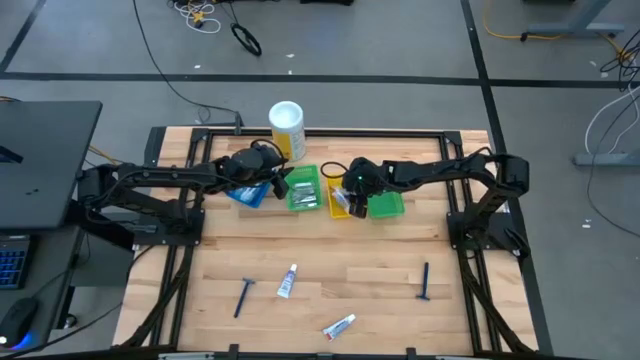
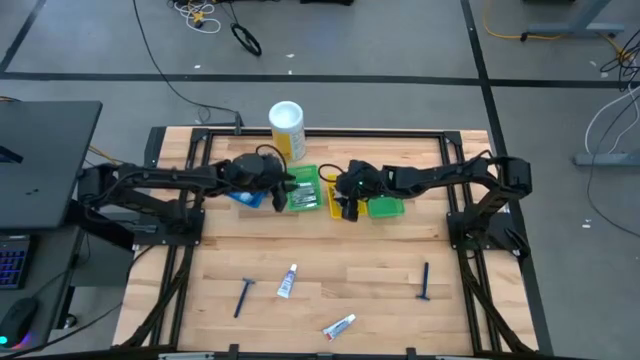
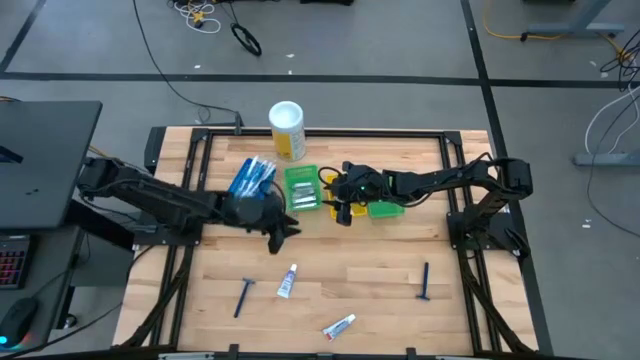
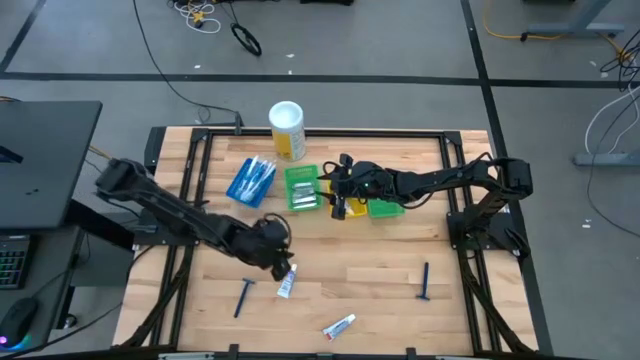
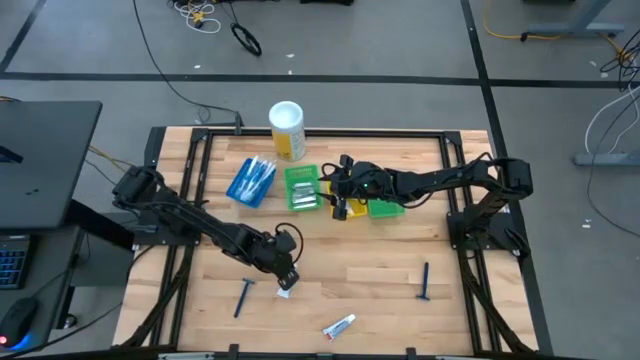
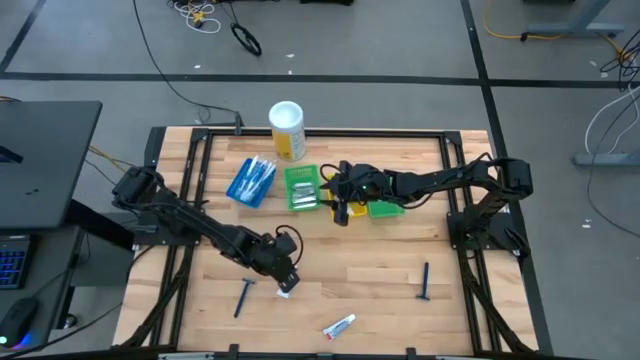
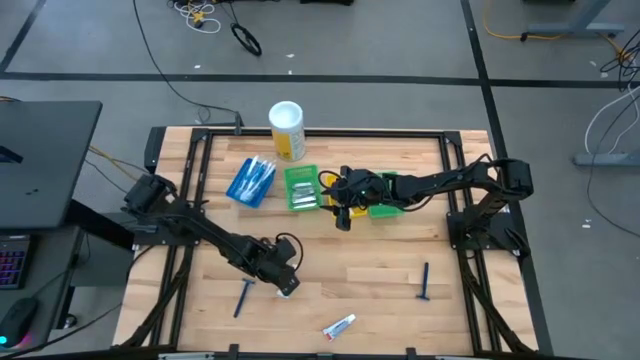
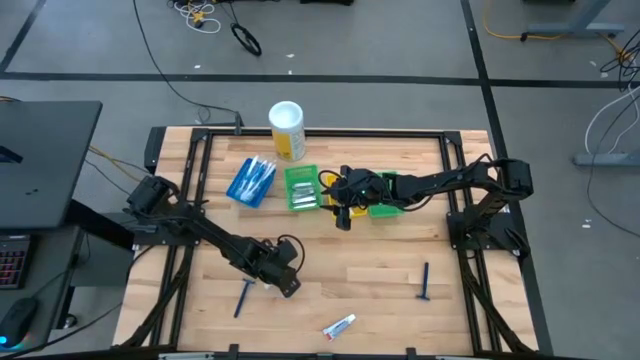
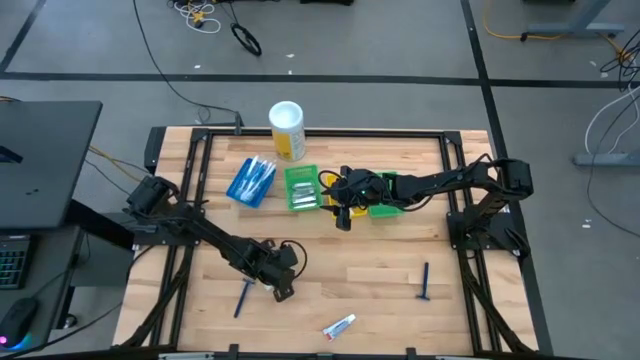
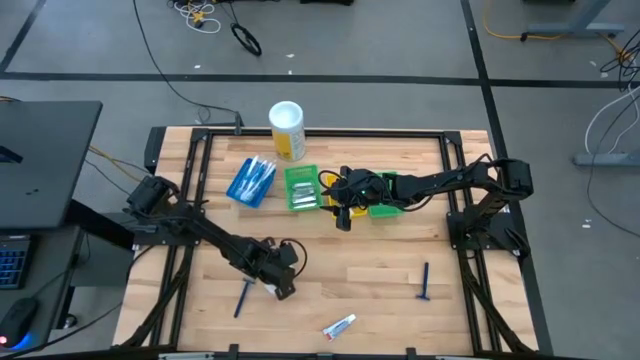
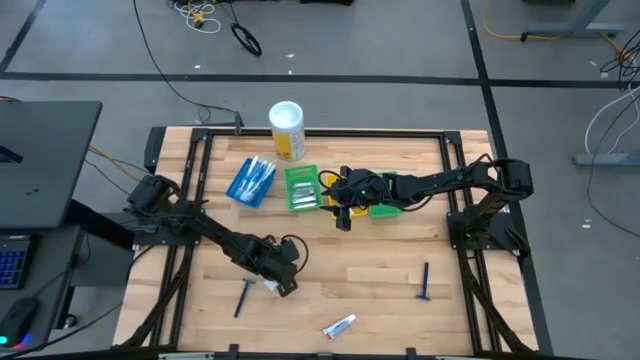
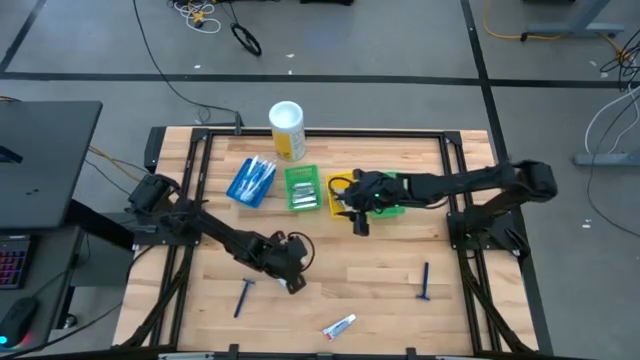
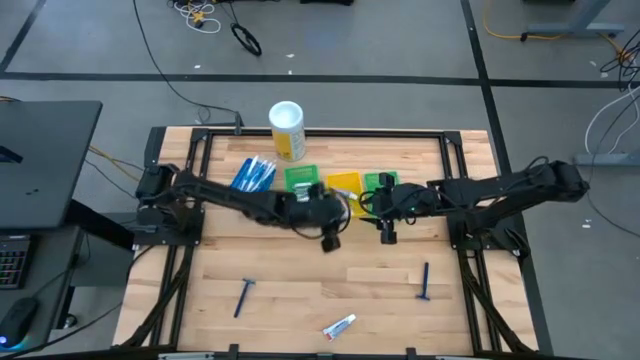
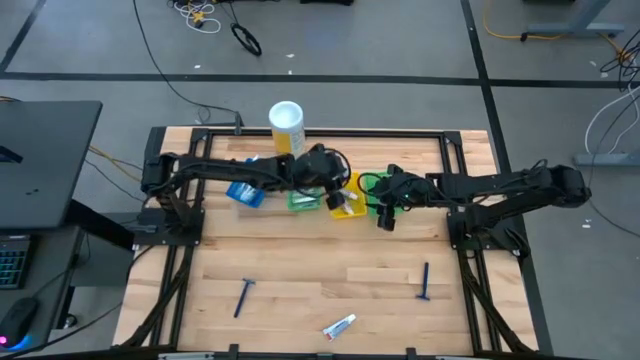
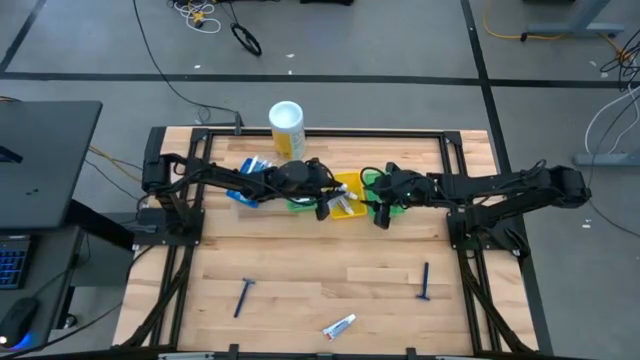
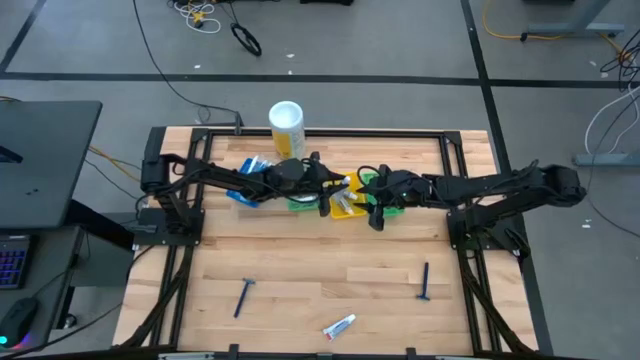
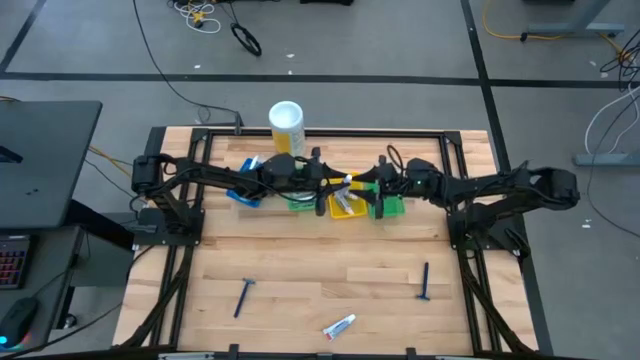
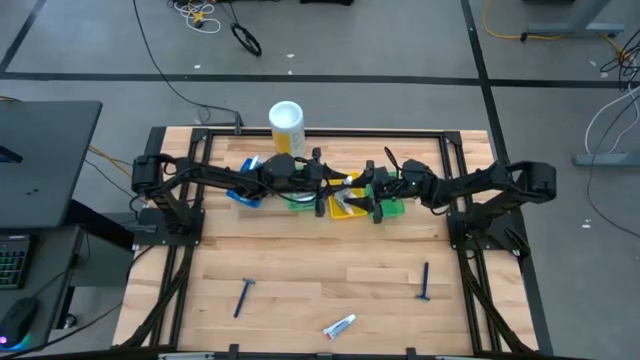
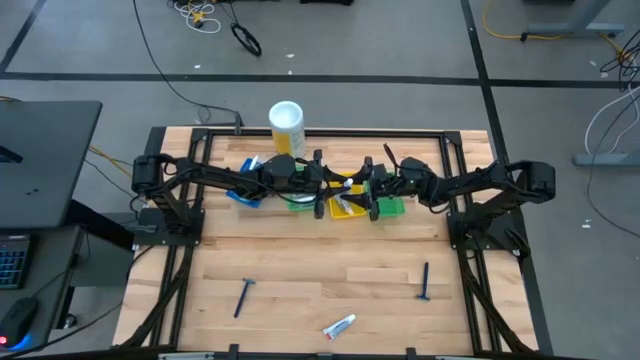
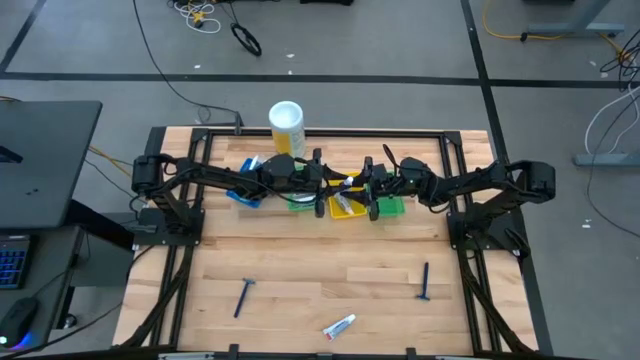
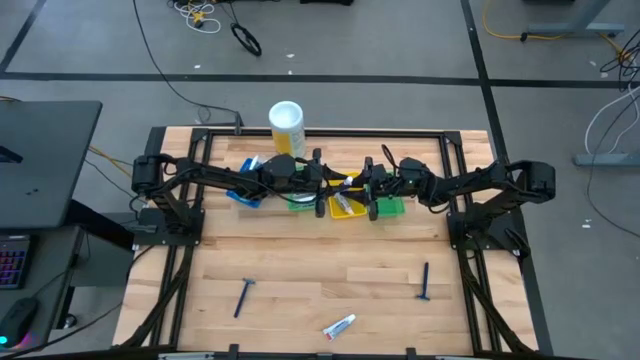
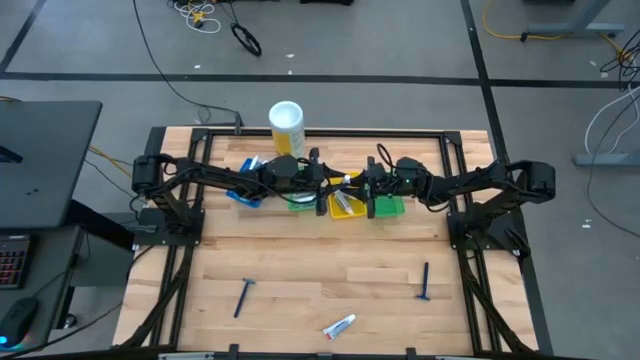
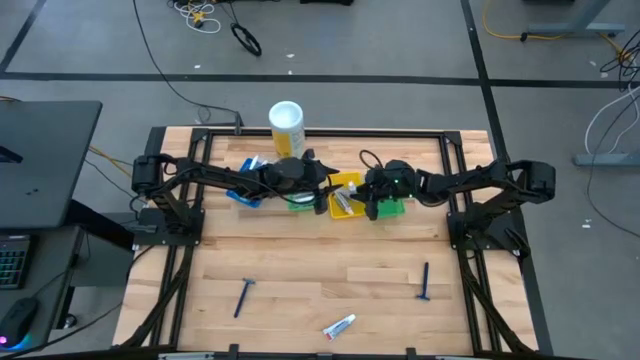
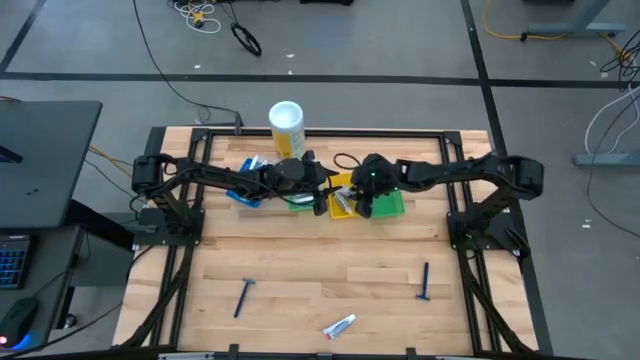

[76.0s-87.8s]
Task: Pick & Place Travel size toiletries
Put the toothpaste into the yellow bin

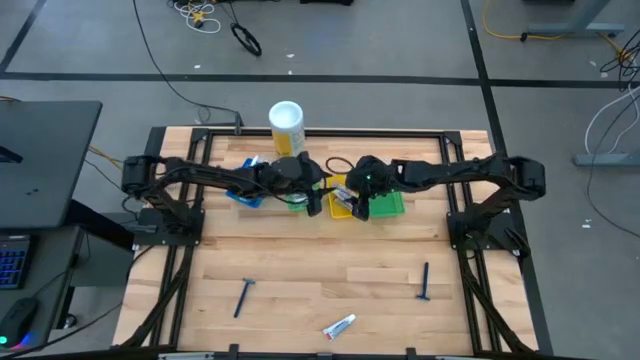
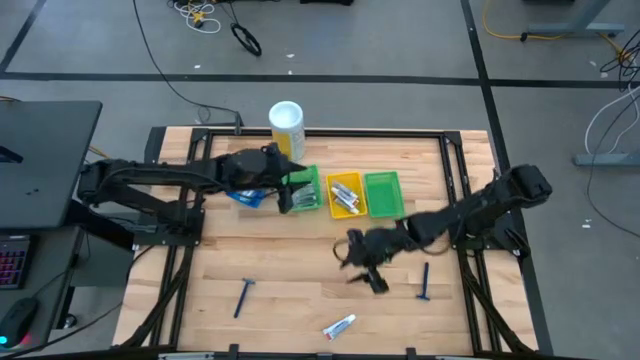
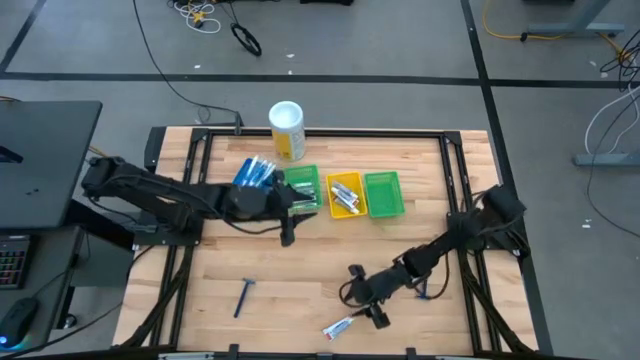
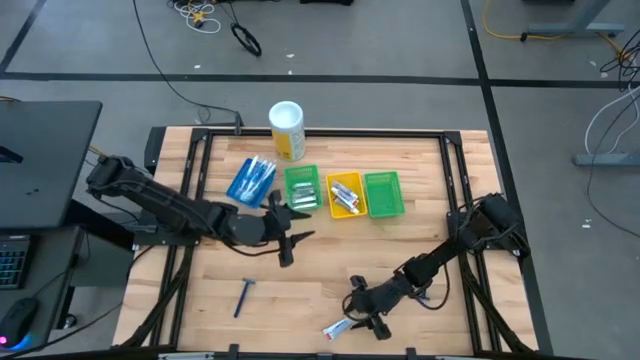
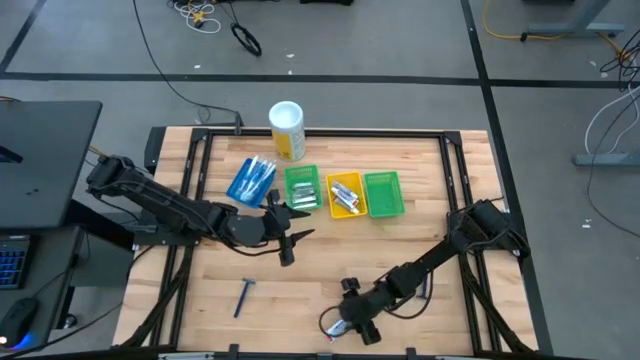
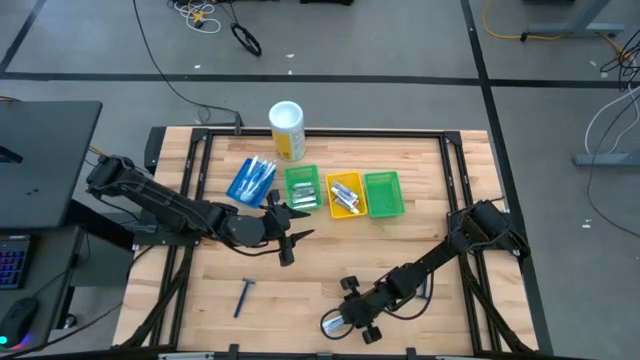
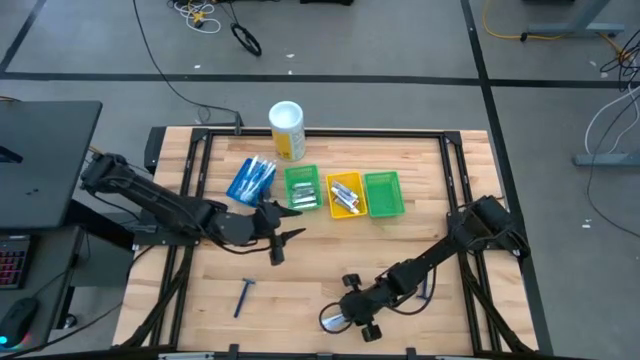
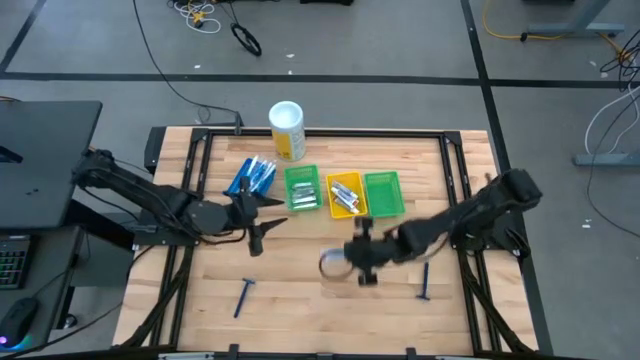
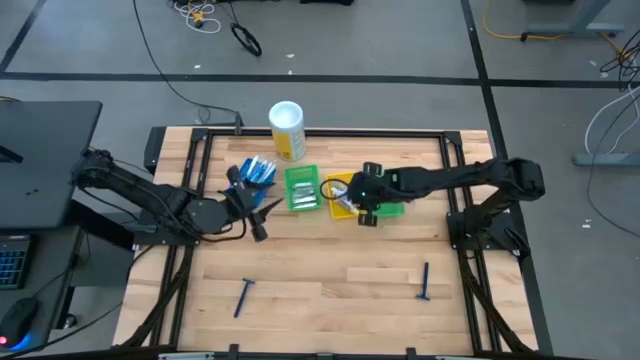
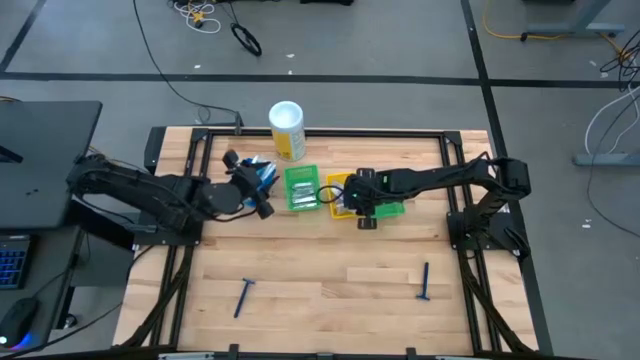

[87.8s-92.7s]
Put the toothpaste into the yellow bin

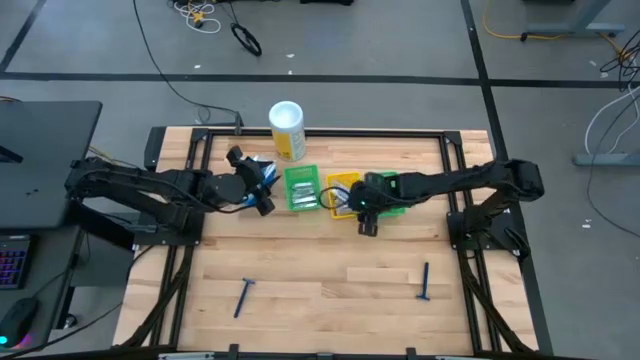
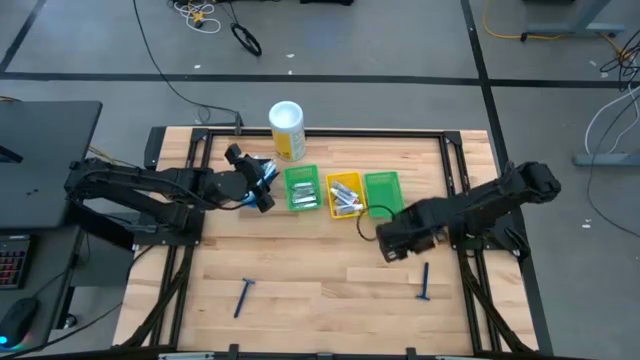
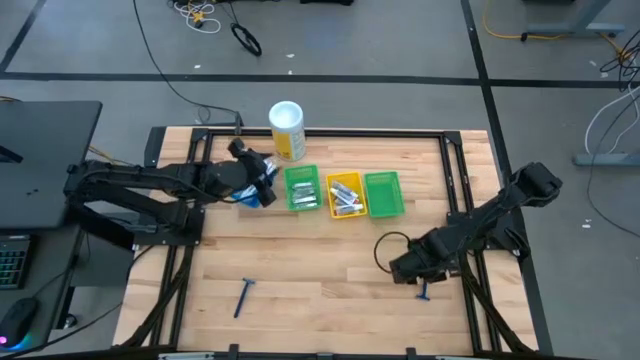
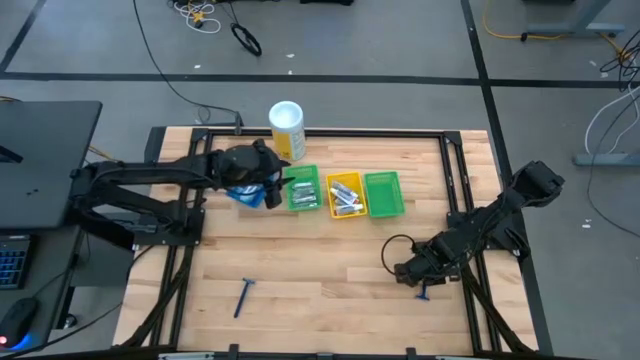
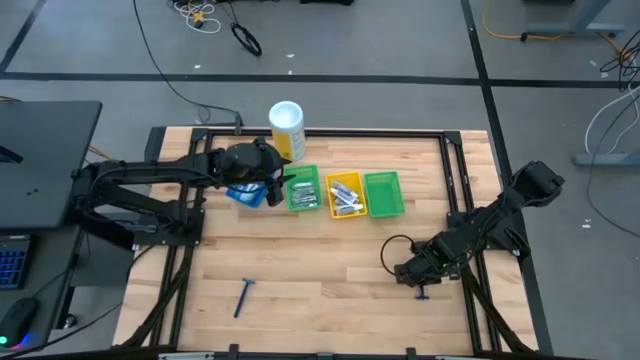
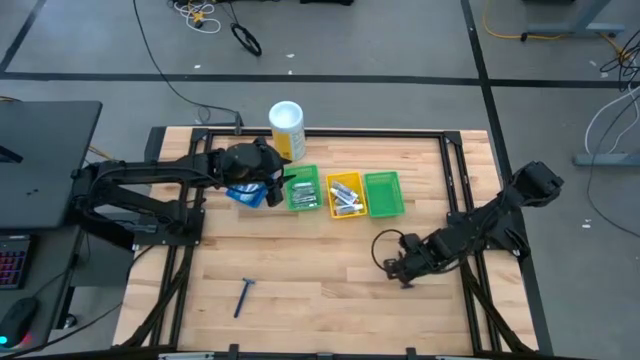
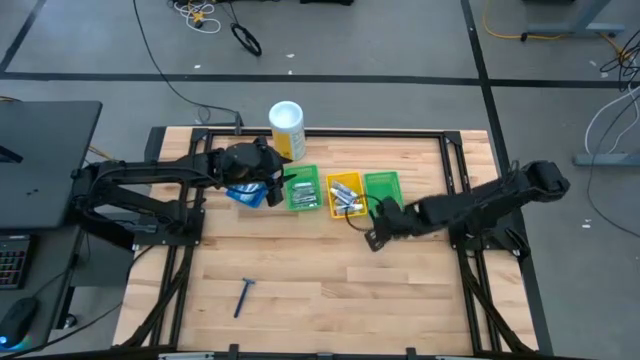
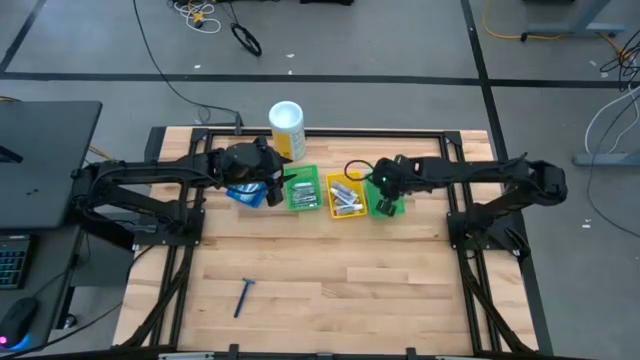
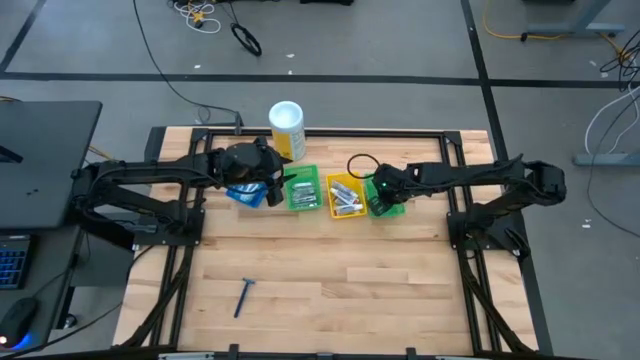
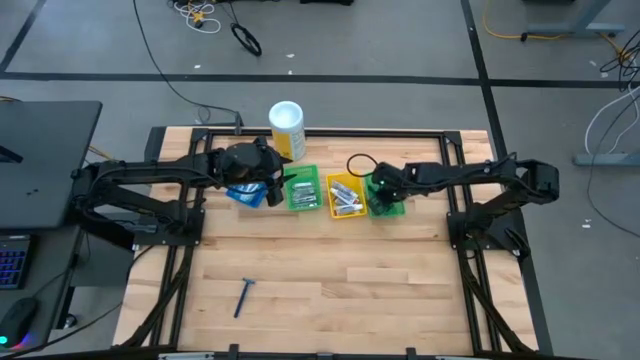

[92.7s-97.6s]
Put the razor into the right green bin
